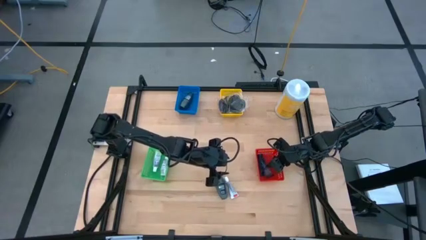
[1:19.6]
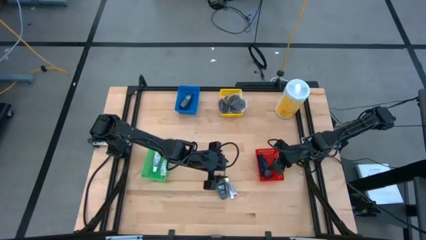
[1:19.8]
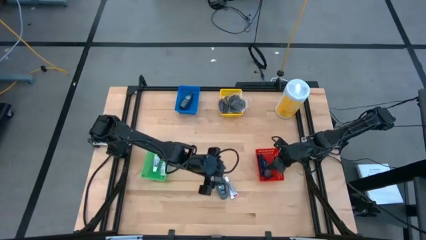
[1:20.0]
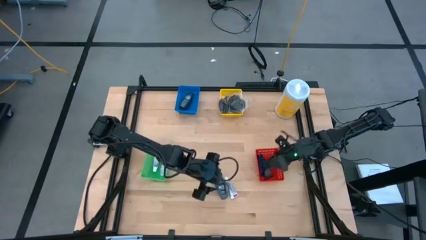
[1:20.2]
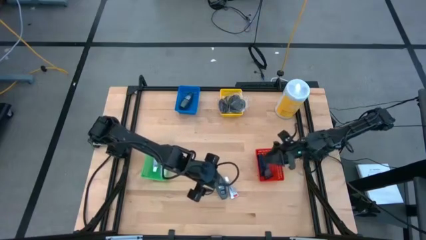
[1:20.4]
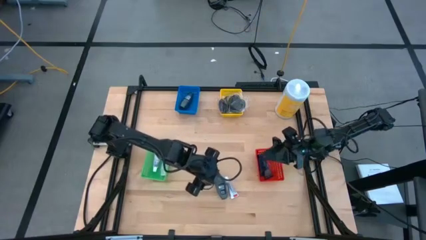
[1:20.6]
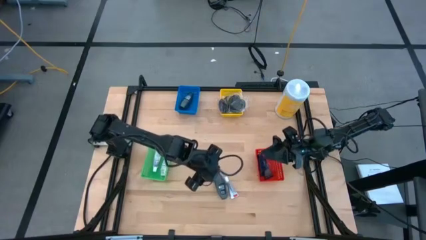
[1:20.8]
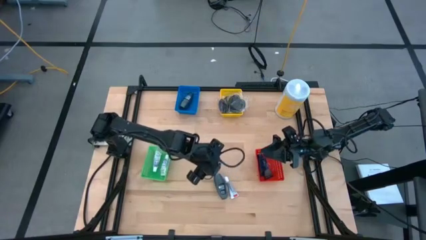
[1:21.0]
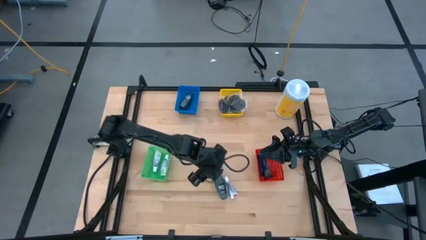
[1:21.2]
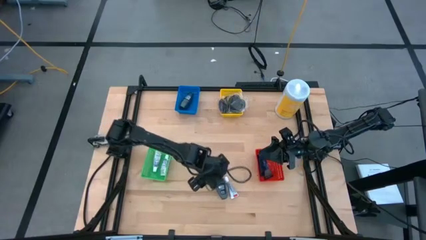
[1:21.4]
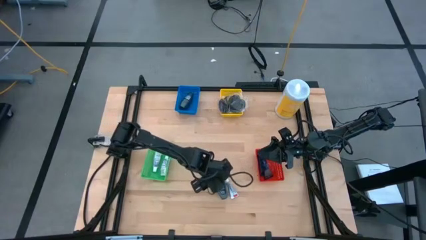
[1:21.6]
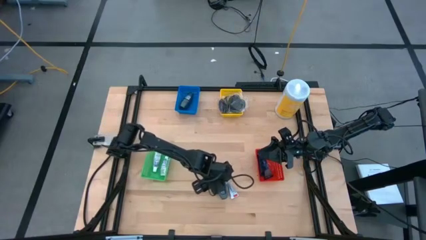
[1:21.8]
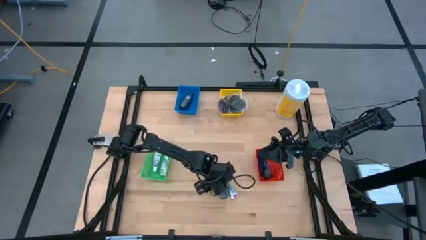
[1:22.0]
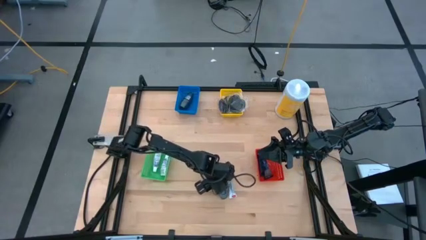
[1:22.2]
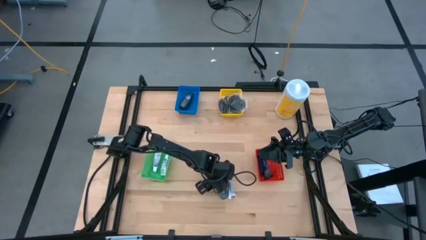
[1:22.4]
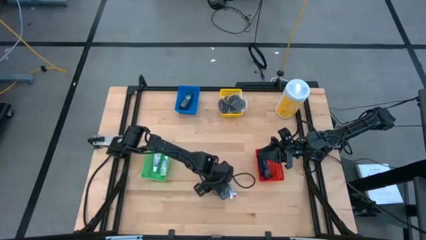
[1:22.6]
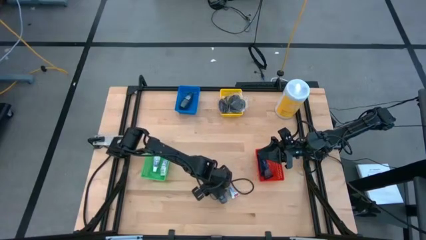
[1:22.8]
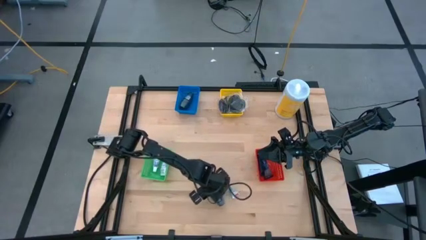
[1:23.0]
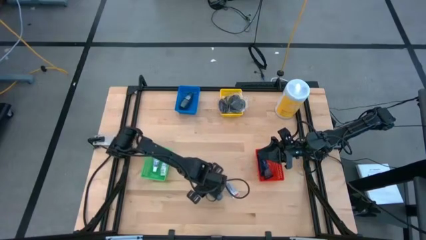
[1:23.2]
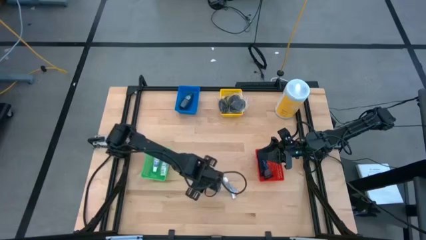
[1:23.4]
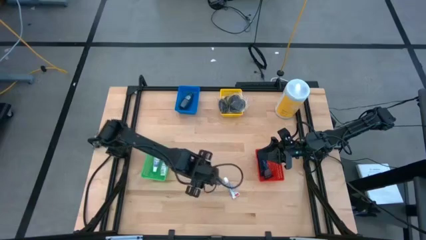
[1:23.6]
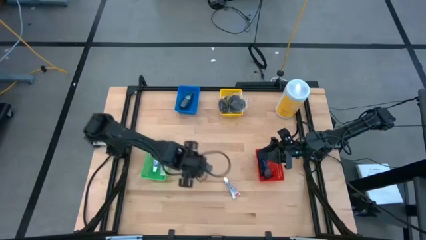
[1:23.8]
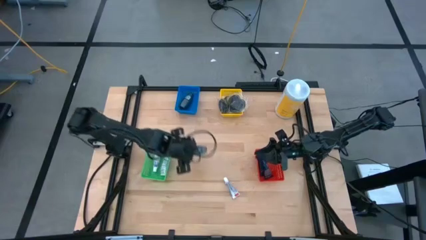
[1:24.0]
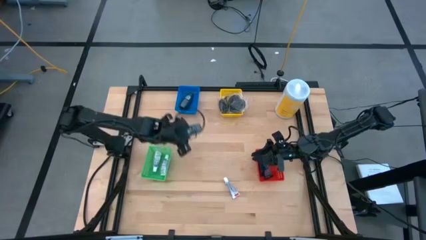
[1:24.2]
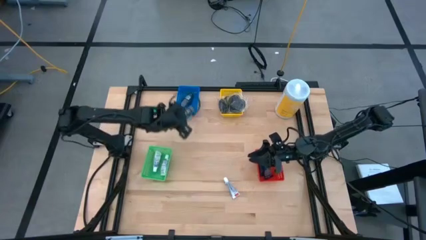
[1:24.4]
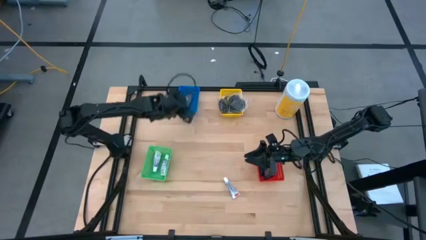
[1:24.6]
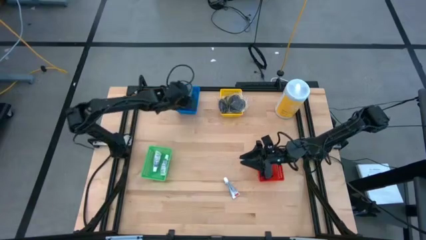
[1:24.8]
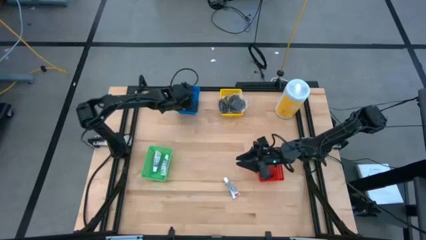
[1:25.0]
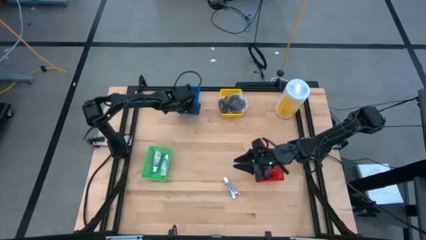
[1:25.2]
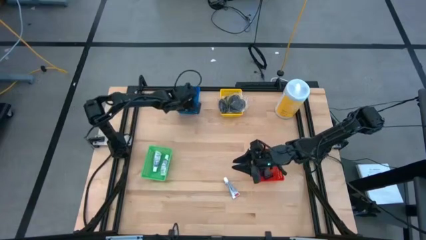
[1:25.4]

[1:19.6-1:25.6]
Task: Pick & Place Travel size toiletries
Put the gray deodorant into the blue bin

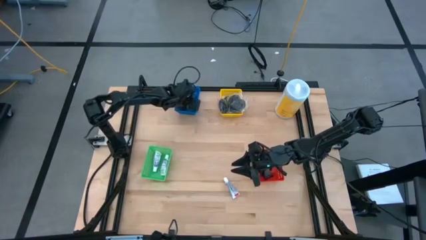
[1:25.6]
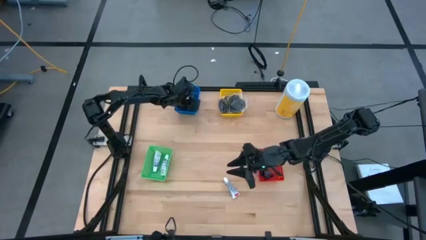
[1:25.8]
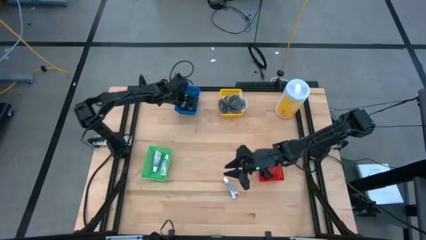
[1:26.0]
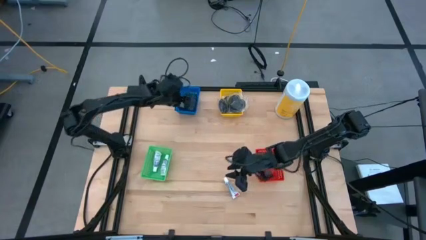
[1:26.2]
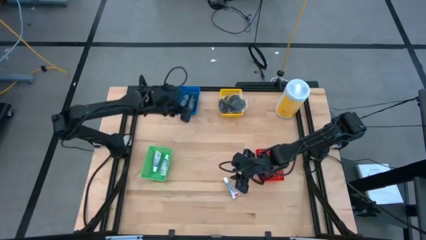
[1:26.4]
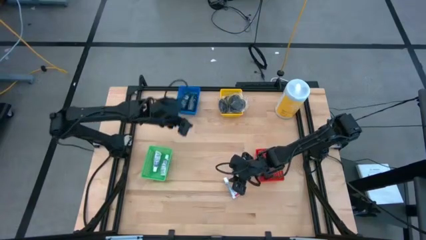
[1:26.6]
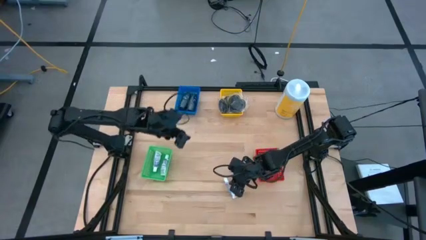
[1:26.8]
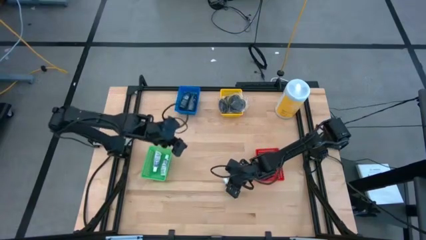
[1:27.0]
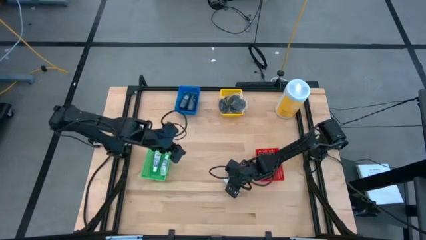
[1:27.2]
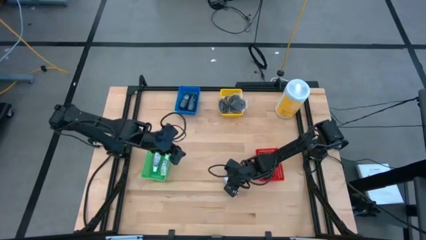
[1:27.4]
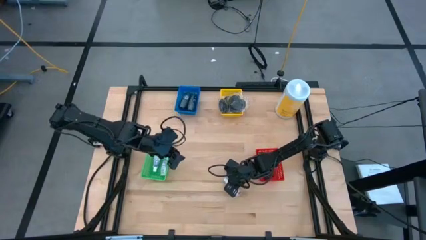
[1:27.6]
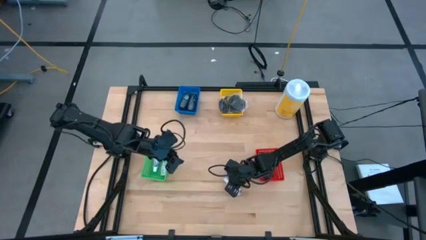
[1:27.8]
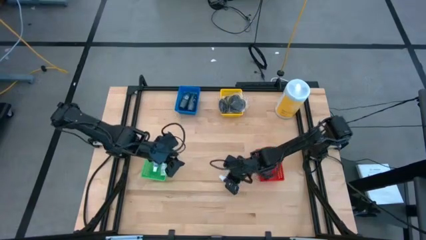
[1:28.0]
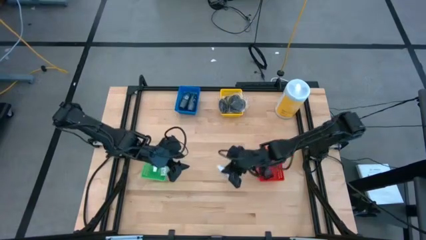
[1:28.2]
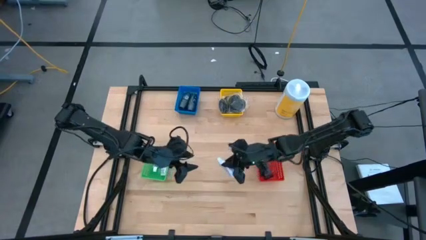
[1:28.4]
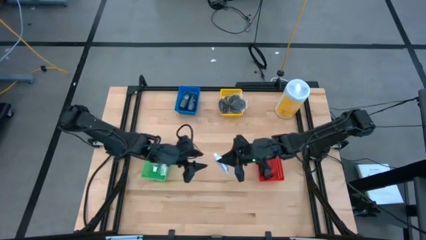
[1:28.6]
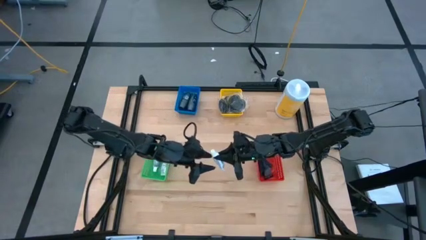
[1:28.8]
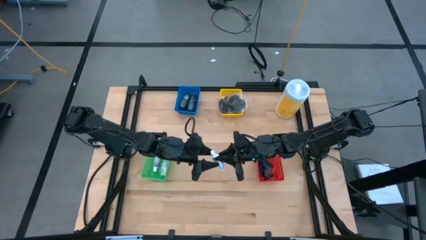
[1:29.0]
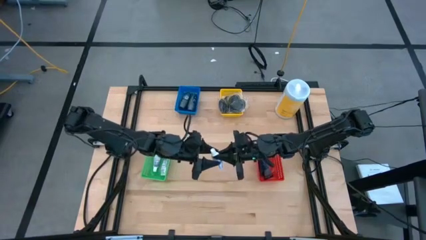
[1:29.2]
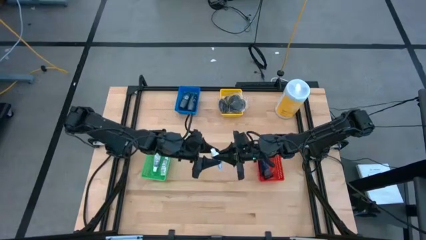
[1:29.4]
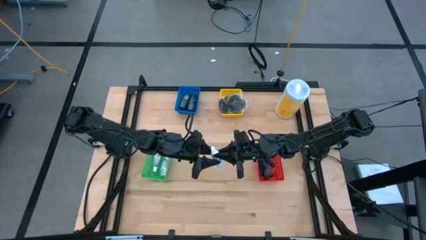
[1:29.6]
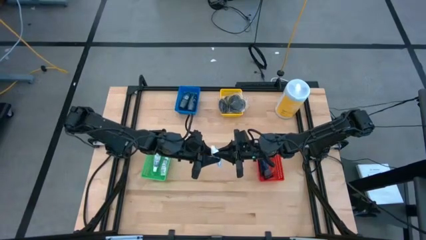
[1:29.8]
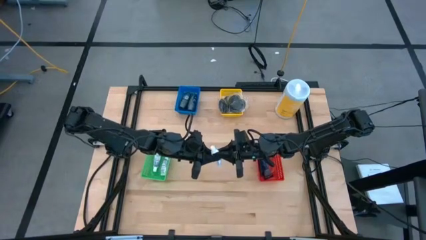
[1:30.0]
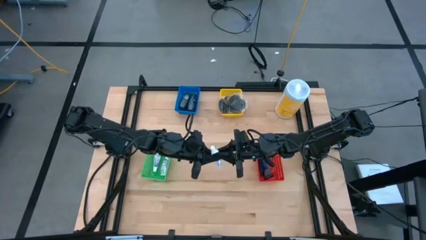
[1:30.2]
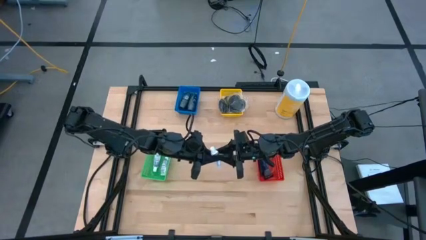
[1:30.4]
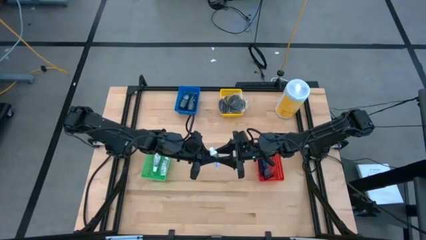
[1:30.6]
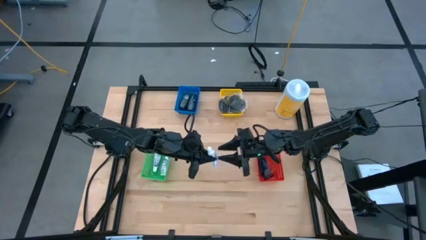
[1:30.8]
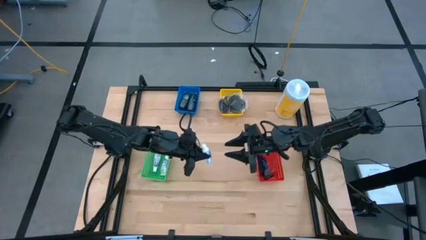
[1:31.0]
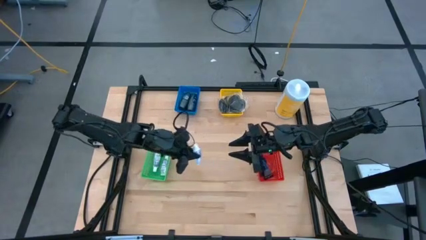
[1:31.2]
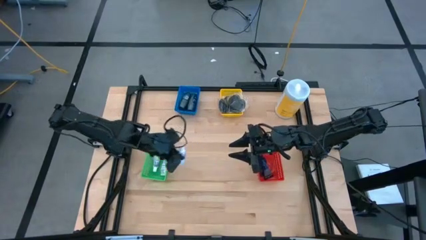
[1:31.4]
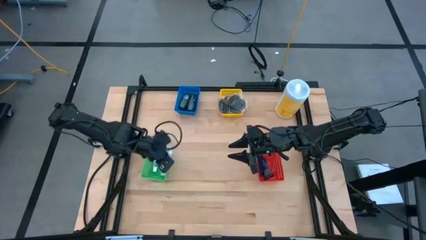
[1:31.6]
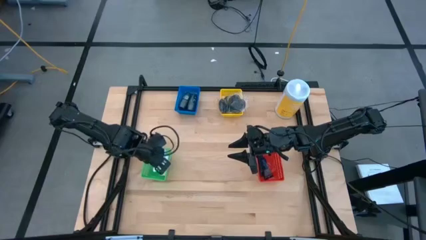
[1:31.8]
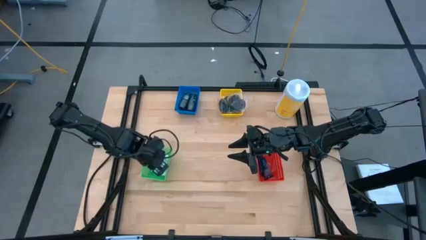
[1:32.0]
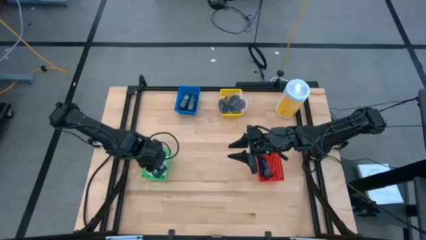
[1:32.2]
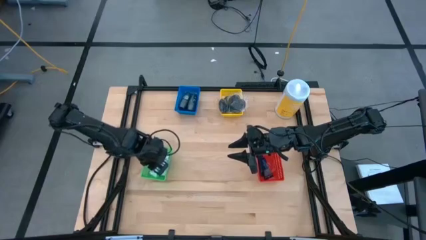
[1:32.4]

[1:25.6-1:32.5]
Put the white toothpaste into the green bin

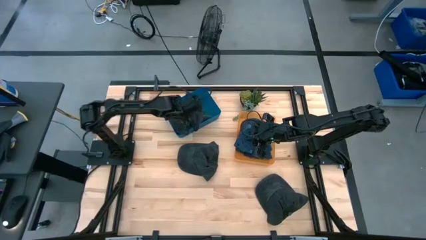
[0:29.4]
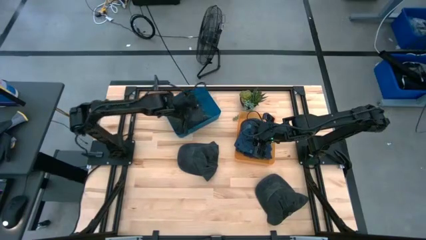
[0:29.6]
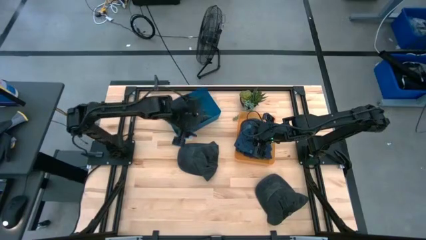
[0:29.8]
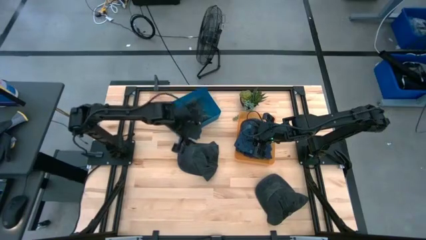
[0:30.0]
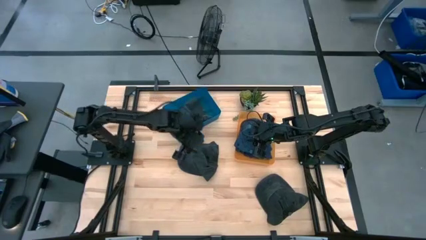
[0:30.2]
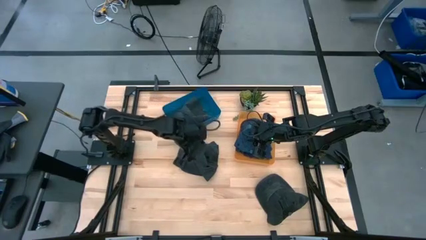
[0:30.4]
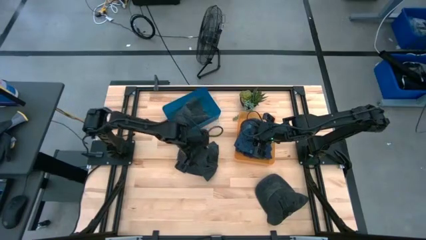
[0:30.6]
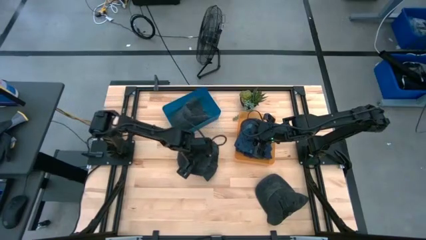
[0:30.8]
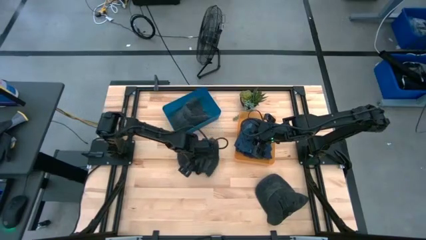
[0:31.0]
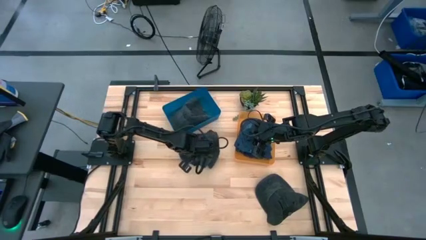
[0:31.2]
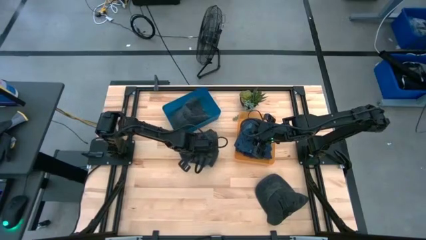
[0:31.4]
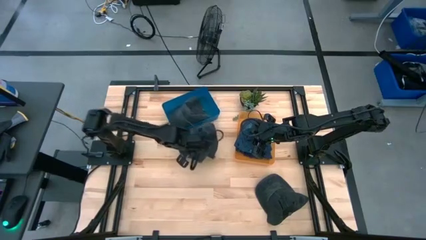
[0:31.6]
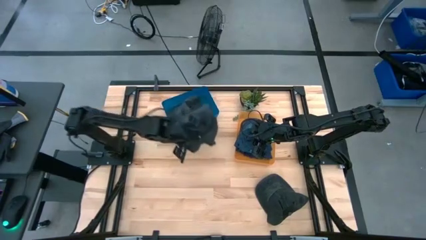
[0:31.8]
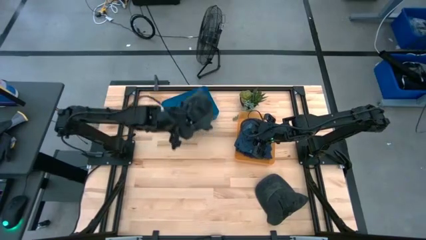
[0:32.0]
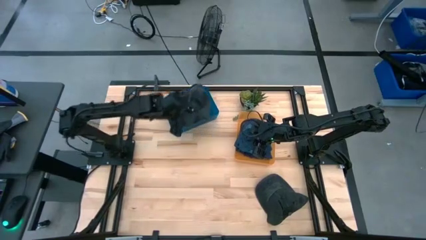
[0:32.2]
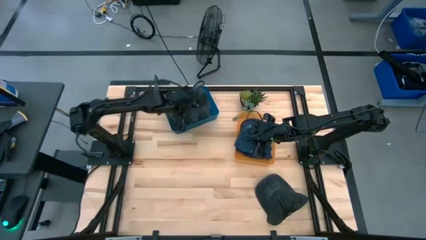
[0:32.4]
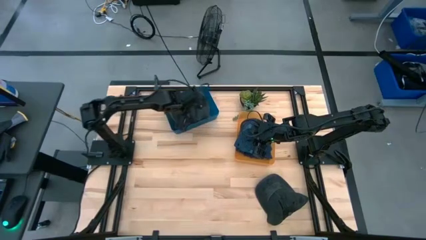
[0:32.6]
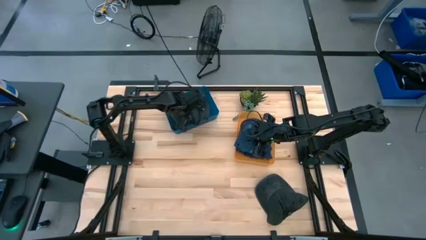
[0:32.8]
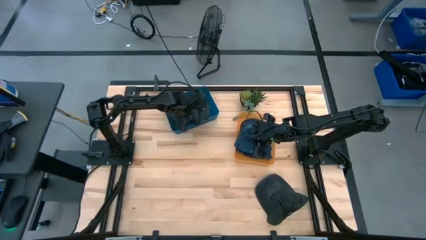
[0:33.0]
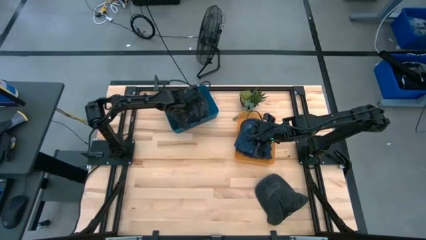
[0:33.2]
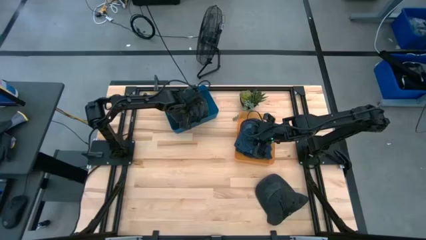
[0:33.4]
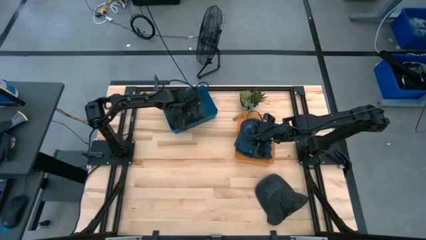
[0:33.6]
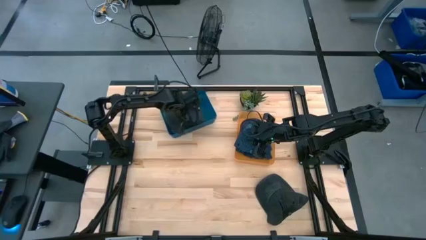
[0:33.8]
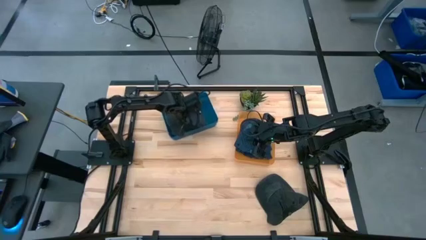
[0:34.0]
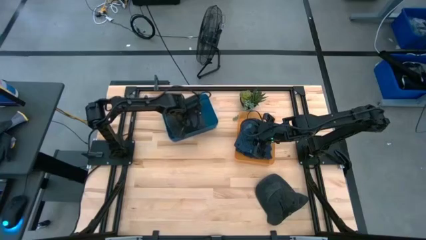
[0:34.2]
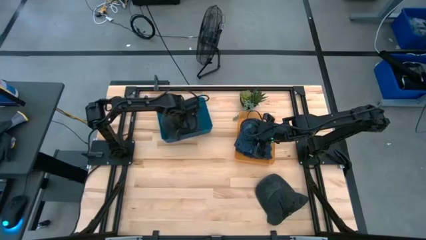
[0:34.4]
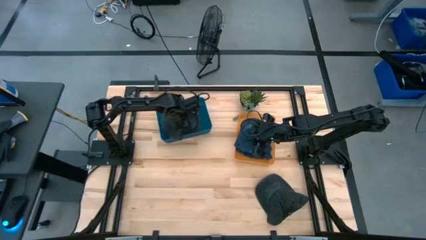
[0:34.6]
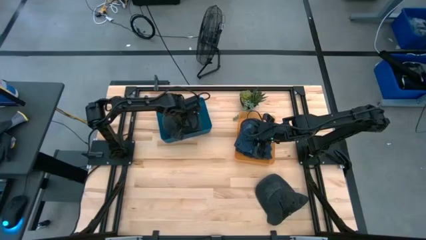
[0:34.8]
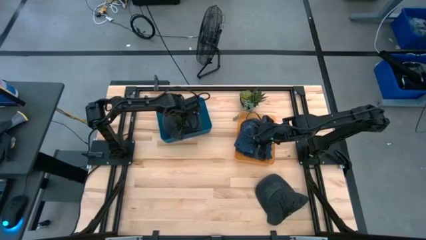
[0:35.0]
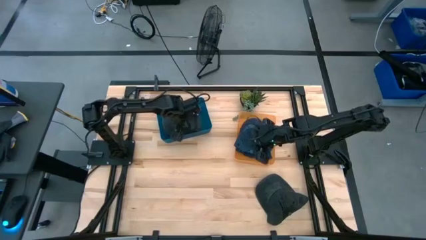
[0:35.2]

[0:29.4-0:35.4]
Task: Pick & Place hat
Put the top black cap into the blue bin
